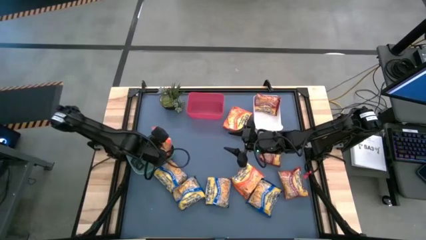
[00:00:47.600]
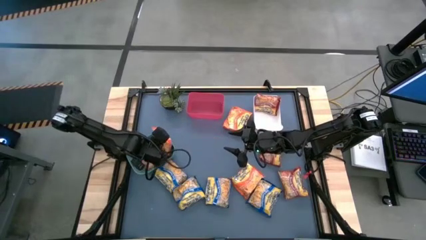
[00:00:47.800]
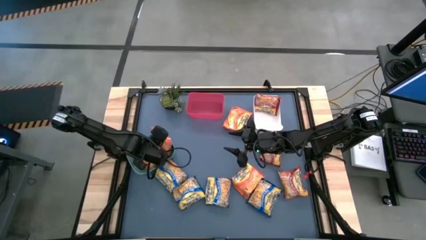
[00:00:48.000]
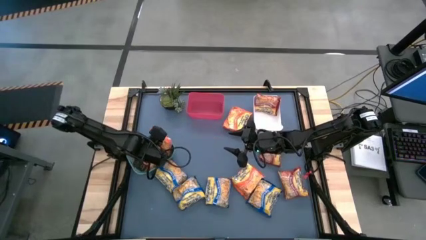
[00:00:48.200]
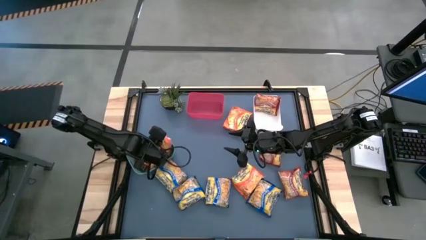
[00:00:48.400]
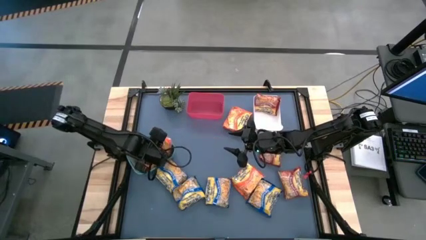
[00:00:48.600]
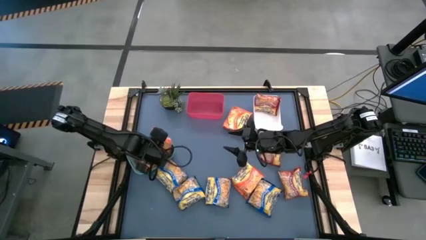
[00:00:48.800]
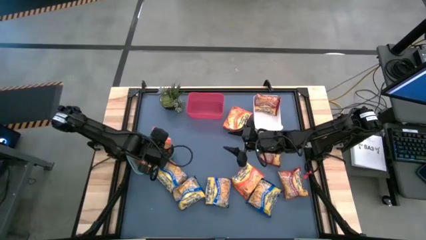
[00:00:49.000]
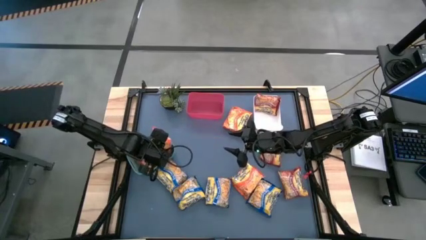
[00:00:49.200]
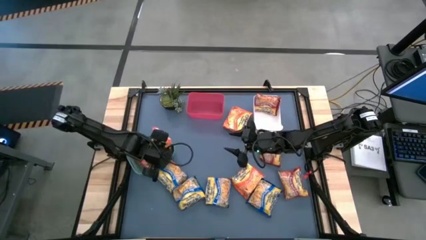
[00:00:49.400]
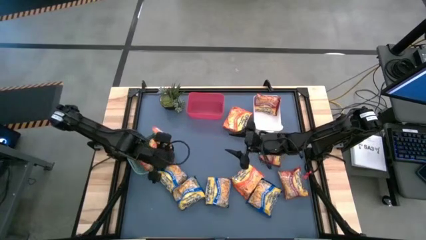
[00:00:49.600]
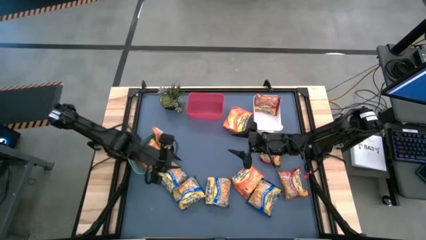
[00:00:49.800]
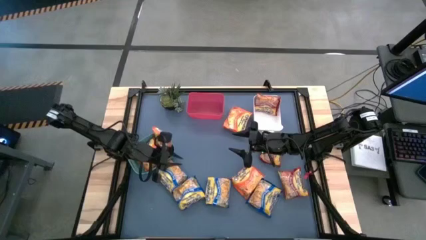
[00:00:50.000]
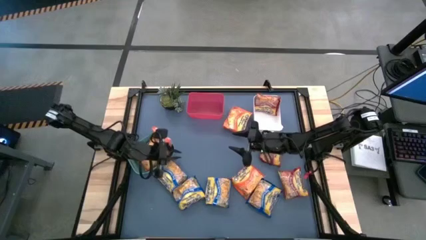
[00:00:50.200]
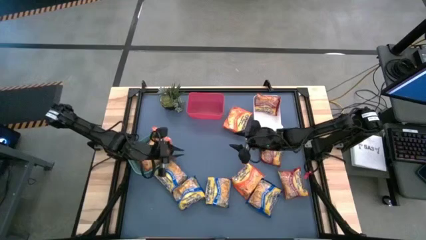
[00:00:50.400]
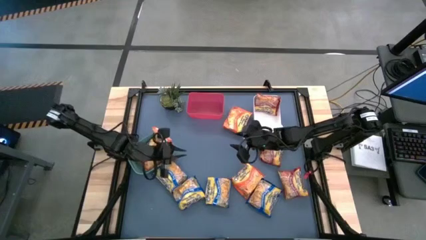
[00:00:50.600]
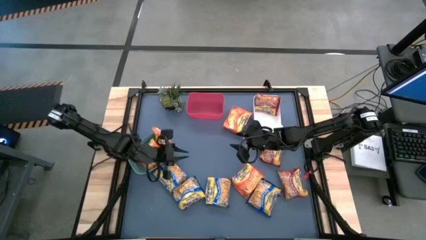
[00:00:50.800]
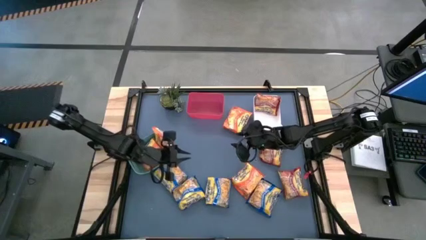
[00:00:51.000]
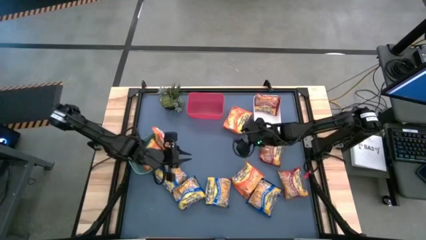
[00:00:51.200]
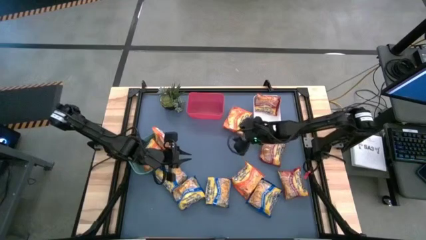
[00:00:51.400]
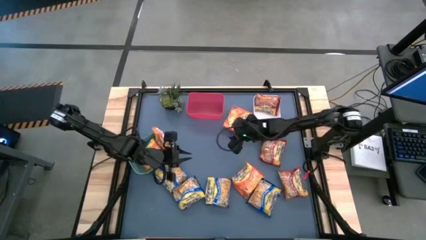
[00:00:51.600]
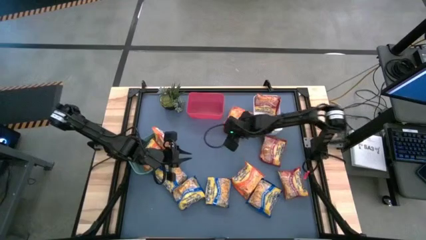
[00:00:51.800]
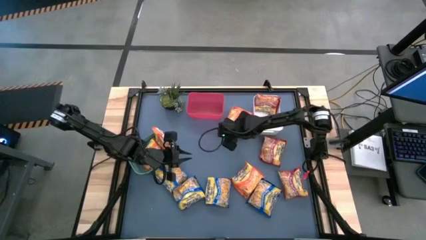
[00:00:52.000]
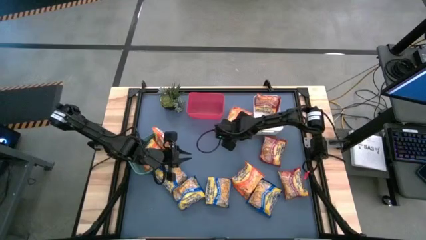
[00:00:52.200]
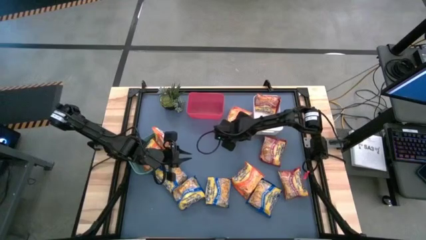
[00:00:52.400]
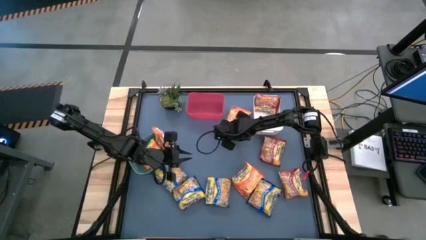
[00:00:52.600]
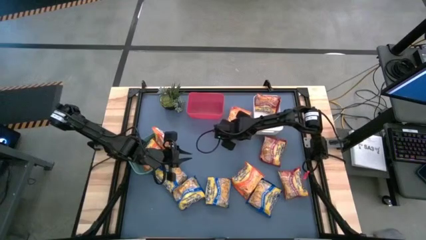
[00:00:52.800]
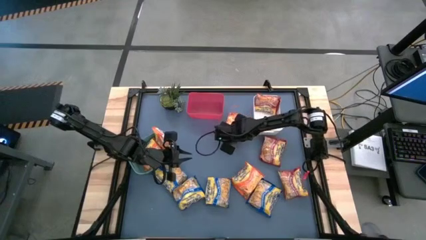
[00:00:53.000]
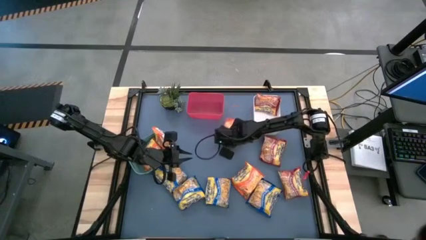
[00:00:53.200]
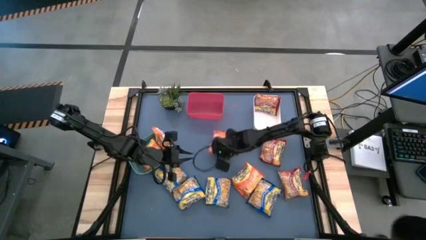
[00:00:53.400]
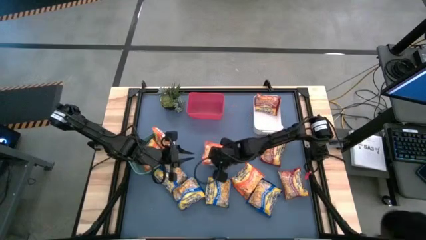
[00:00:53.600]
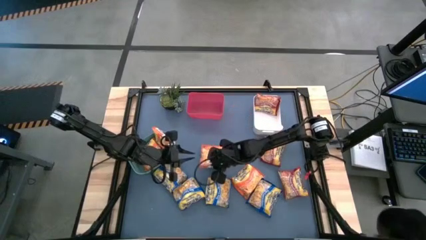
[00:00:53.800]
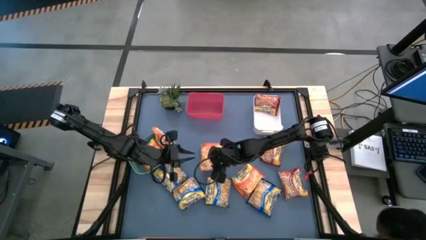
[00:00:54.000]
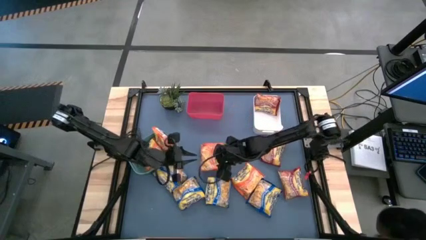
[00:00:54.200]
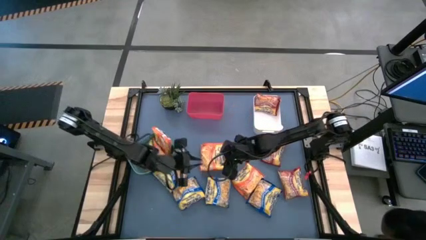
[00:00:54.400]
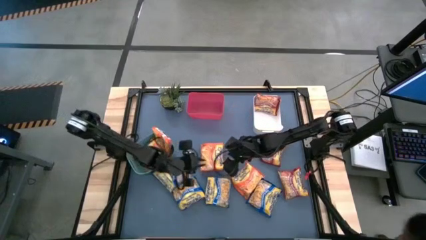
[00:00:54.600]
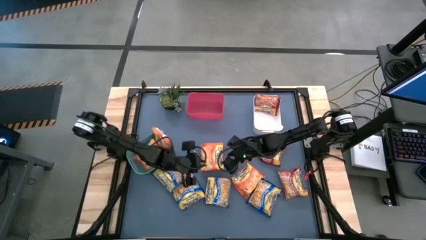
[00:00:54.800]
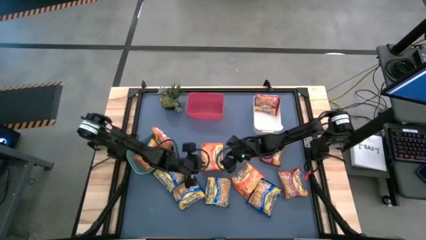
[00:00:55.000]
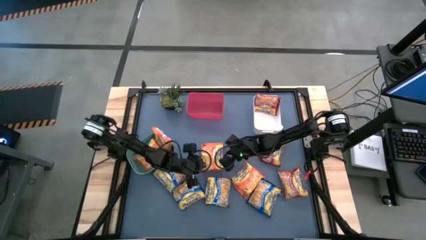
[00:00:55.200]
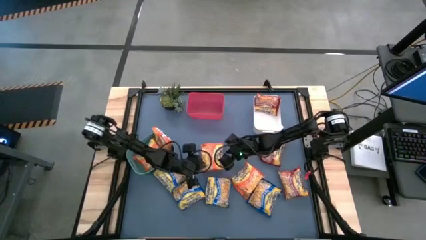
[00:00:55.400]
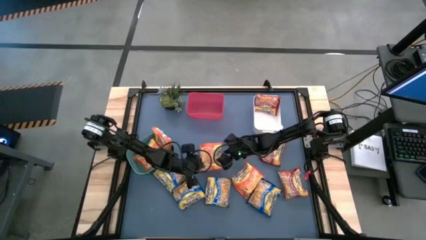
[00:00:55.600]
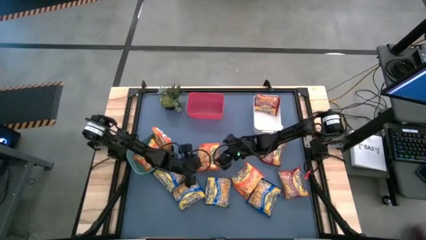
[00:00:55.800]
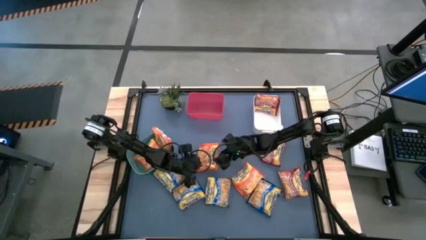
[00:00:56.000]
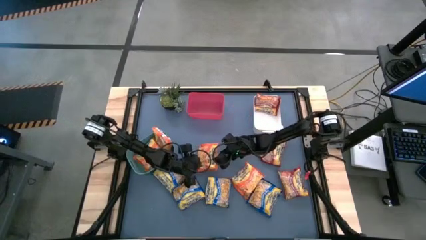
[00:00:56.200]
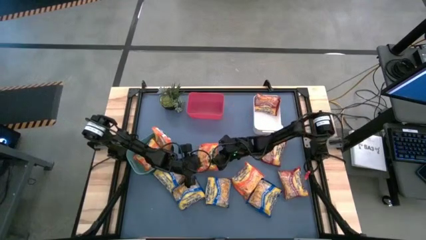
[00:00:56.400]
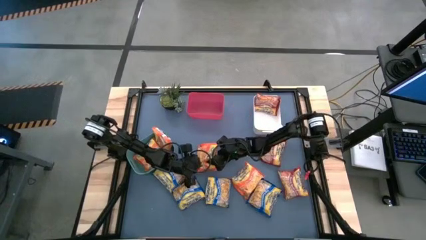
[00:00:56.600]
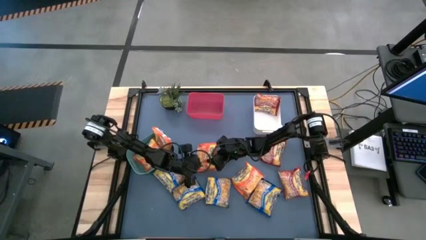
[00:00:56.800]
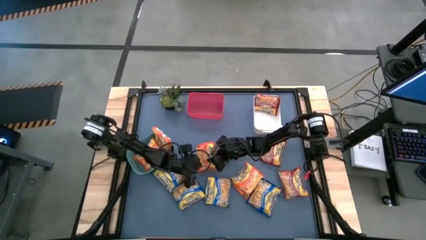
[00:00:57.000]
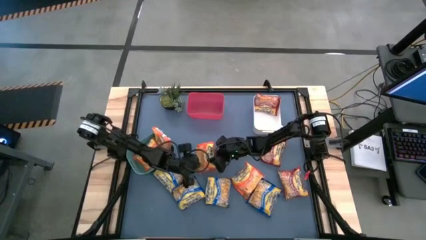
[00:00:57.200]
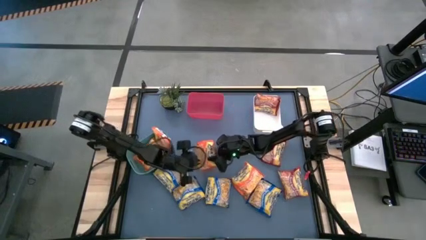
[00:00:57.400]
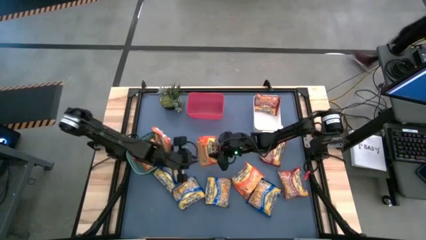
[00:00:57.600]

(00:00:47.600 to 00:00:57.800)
Task: Sort Maruchan noodles
Put the orange noodle pack into the green bin

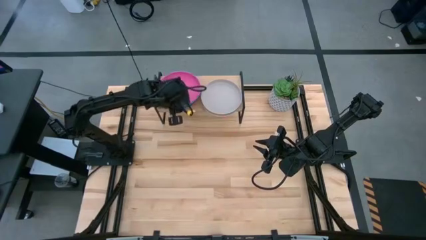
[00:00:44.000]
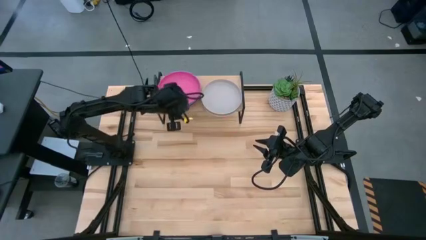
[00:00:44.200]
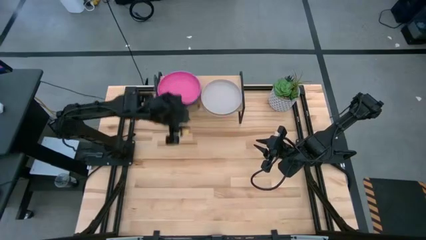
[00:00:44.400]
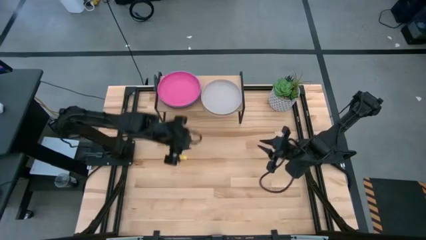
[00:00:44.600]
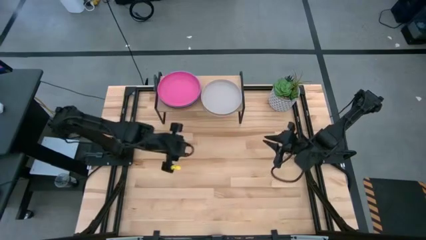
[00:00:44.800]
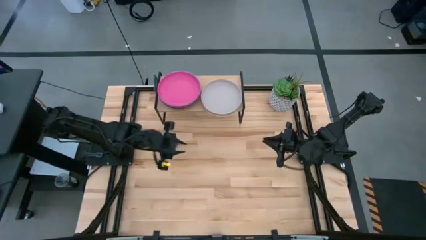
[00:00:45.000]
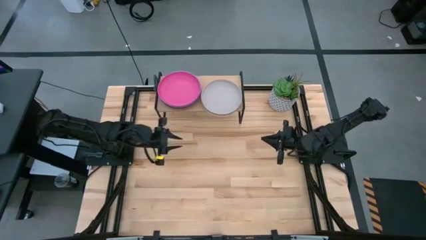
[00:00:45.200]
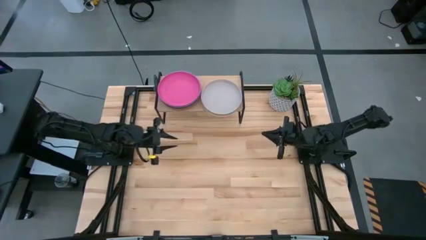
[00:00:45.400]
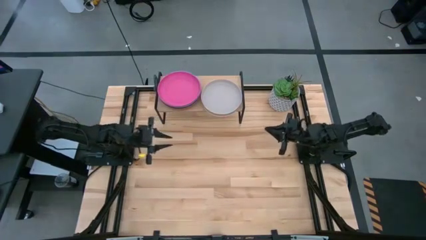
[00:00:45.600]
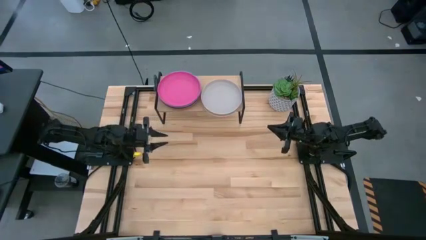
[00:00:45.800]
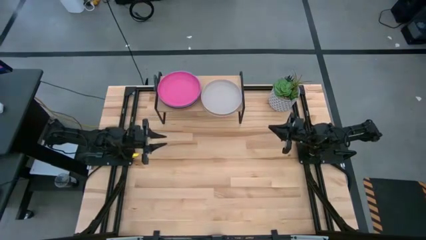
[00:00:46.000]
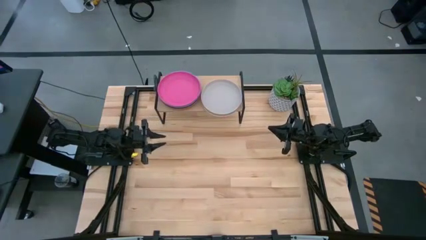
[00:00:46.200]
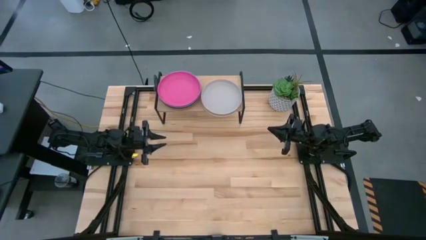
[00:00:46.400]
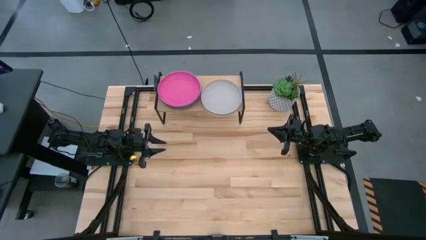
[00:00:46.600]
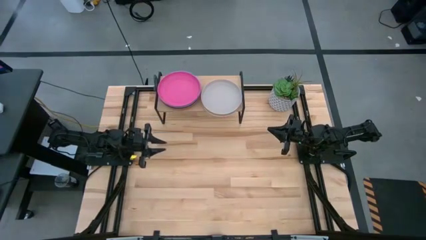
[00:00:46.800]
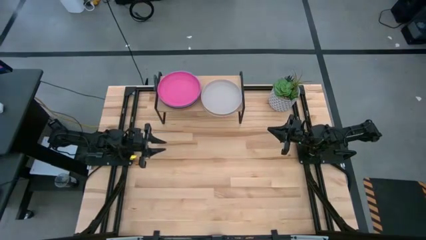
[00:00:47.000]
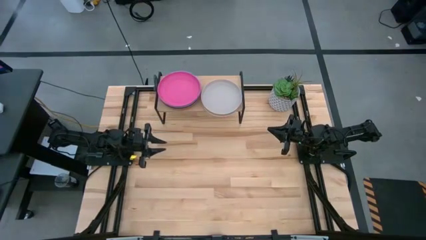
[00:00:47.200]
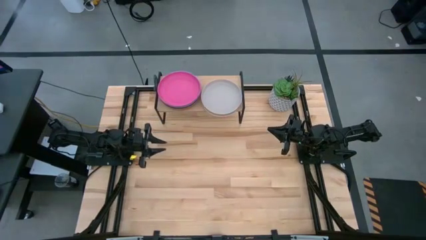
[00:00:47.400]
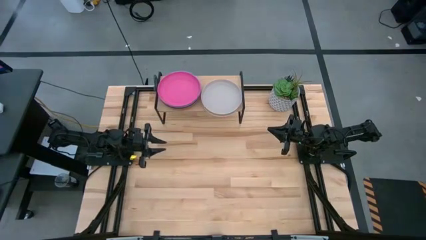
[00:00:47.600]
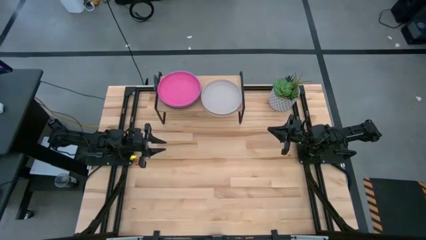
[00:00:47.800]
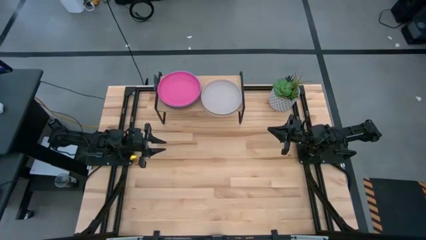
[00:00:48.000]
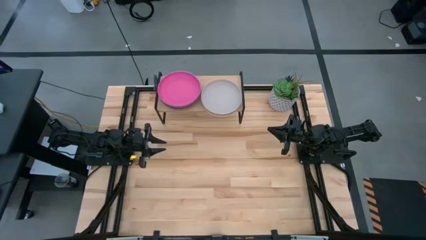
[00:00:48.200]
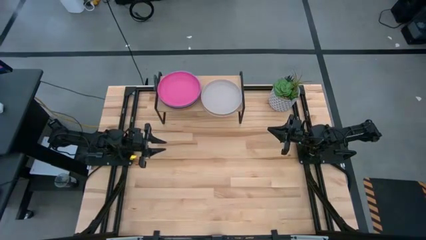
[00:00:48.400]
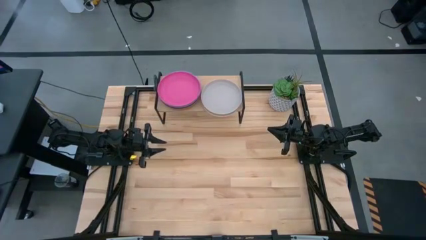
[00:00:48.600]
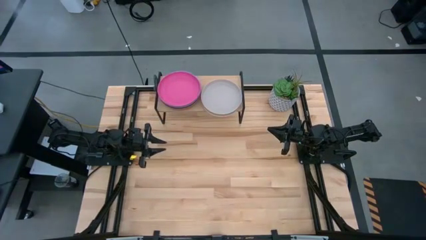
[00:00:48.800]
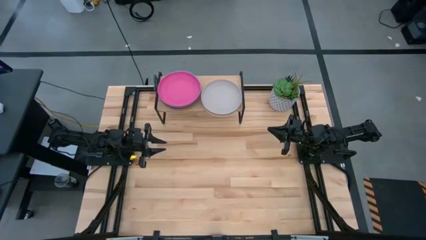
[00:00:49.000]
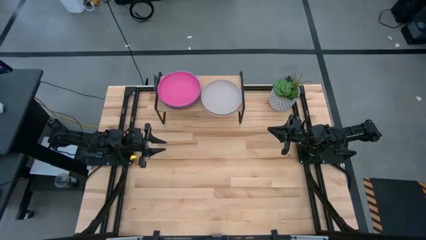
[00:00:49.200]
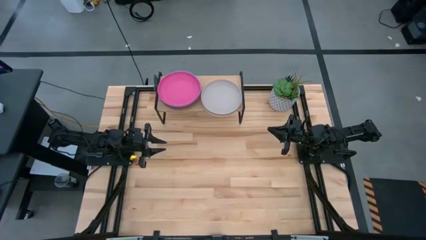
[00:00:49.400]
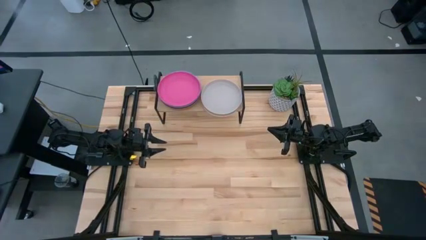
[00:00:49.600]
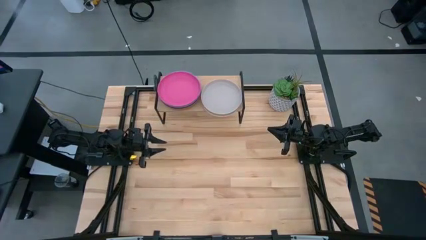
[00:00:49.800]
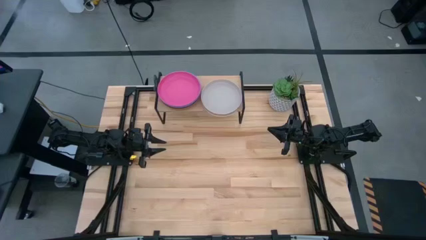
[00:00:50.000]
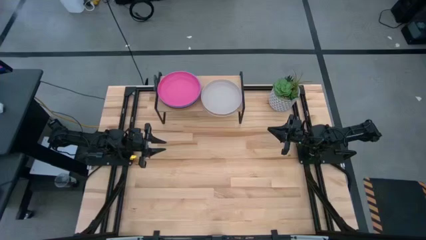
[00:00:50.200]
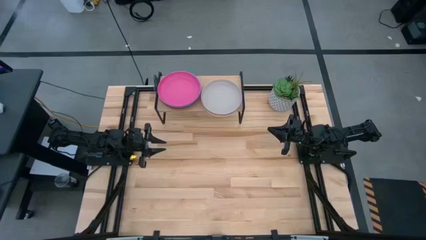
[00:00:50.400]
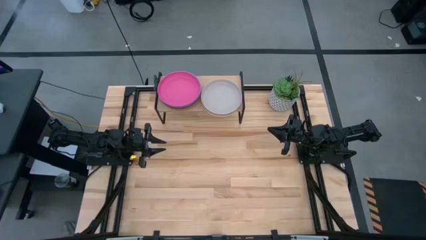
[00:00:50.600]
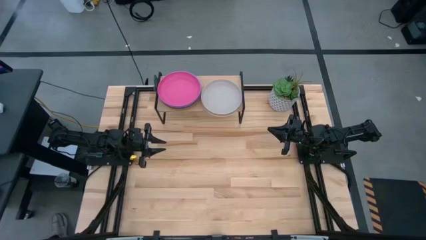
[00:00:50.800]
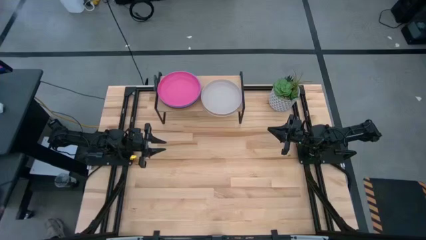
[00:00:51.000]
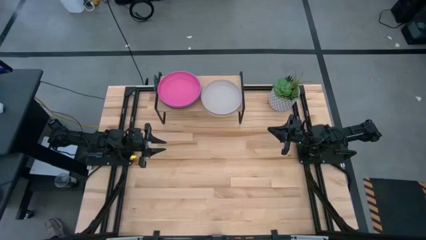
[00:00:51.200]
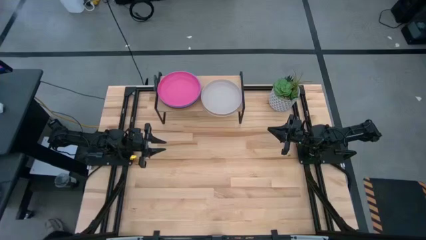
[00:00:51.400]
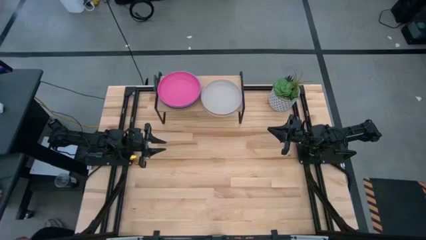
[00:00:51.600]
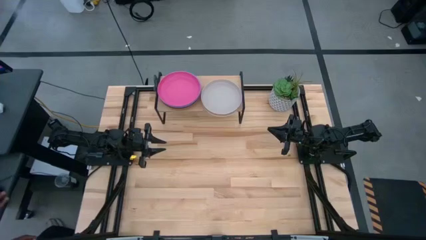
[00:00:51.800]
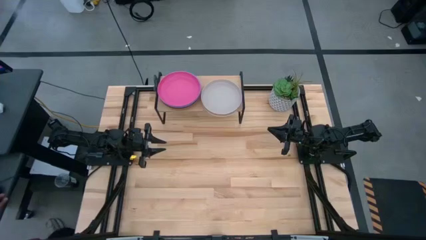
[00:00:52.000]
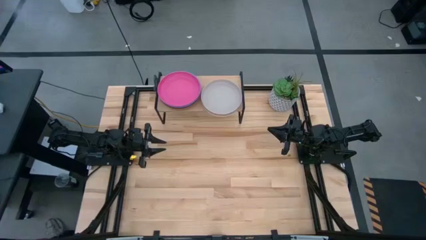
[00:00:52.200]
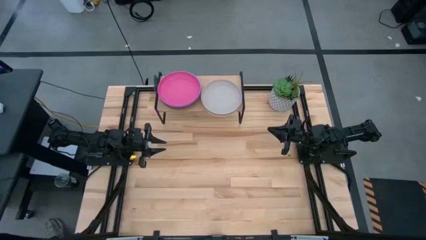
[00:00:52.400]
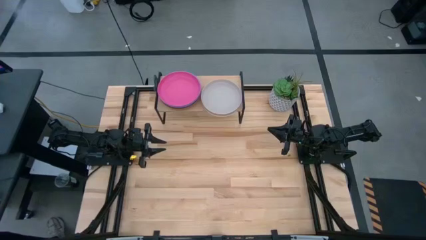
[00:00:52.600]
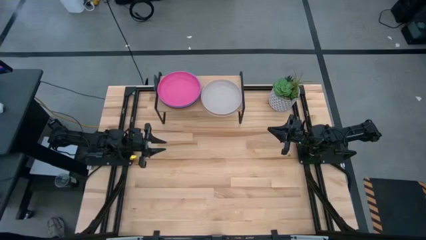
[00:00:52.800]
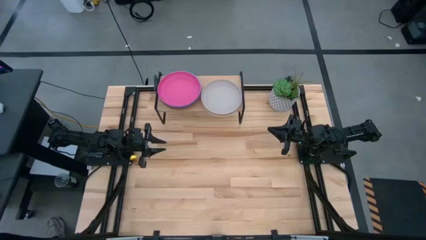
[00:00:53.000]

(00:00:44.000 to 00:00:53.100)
Task: Place and stack plates onto a shelf
Return to Home Position
